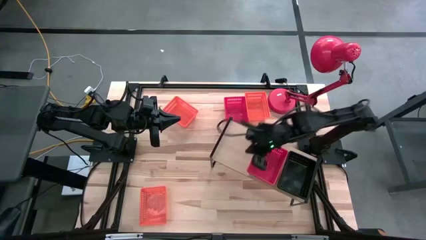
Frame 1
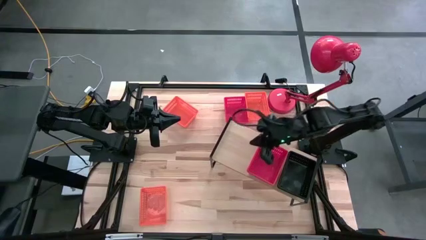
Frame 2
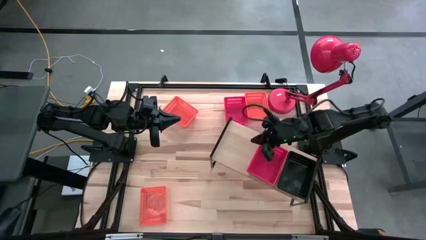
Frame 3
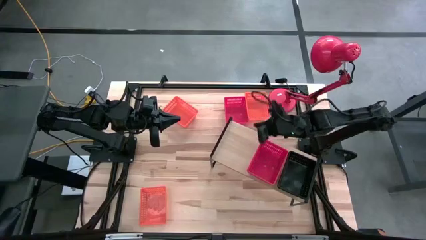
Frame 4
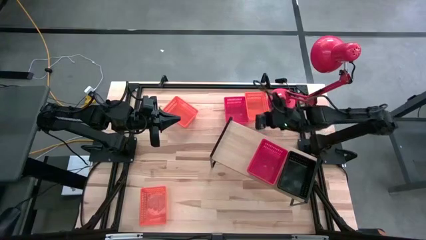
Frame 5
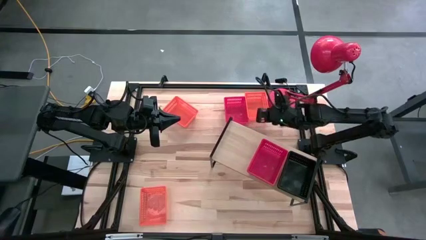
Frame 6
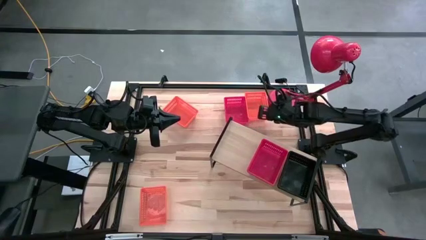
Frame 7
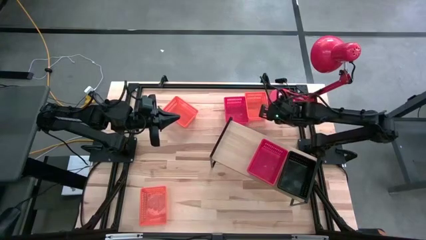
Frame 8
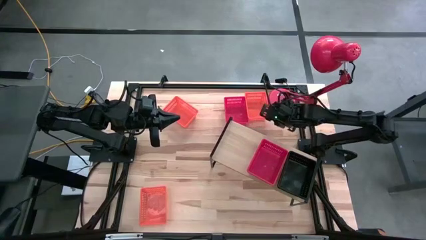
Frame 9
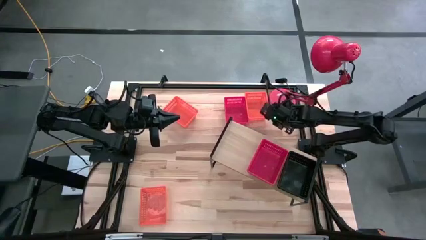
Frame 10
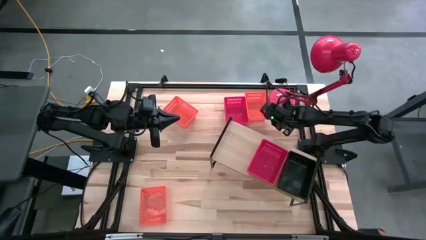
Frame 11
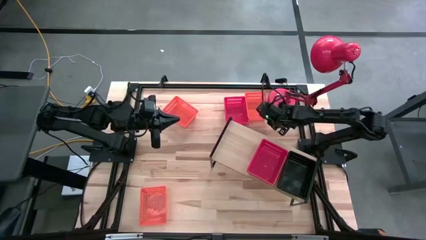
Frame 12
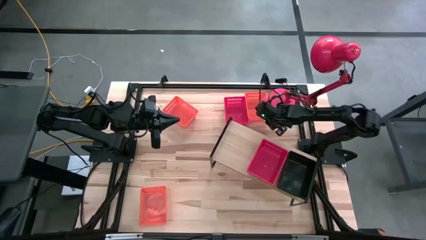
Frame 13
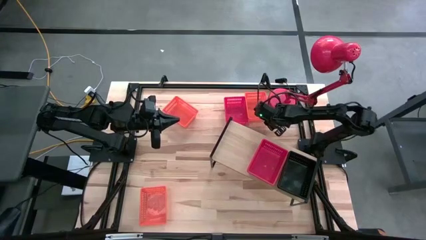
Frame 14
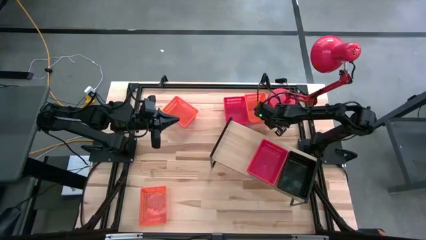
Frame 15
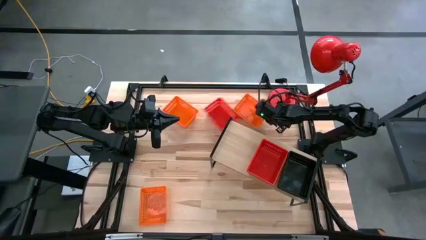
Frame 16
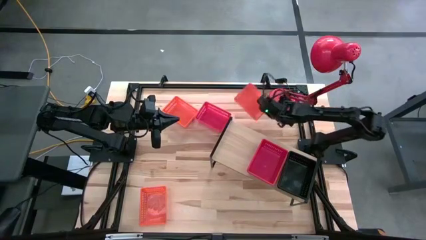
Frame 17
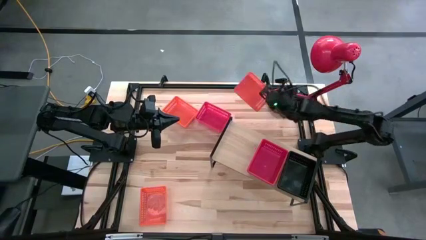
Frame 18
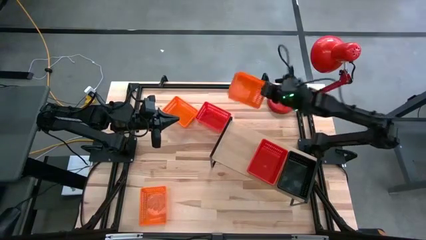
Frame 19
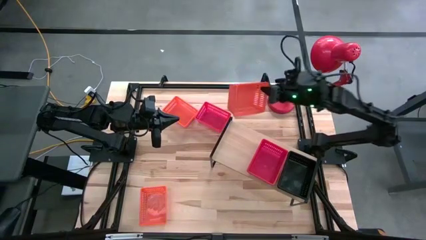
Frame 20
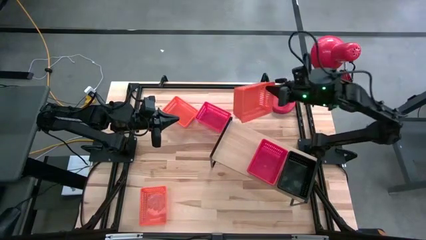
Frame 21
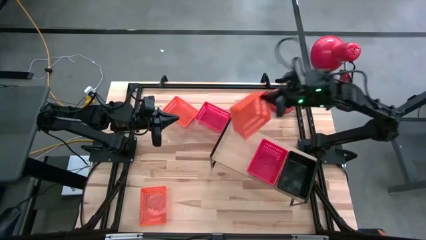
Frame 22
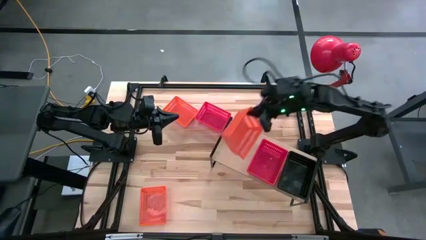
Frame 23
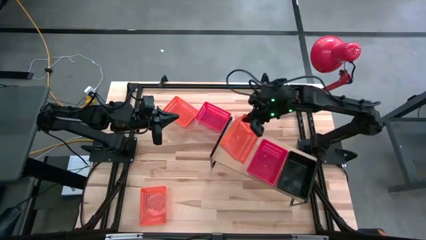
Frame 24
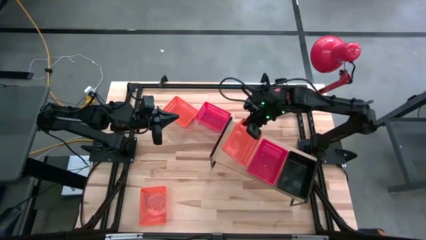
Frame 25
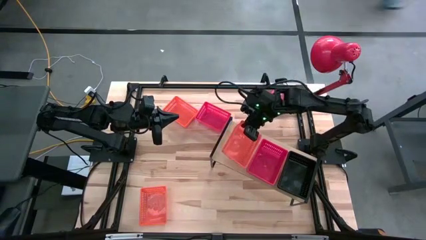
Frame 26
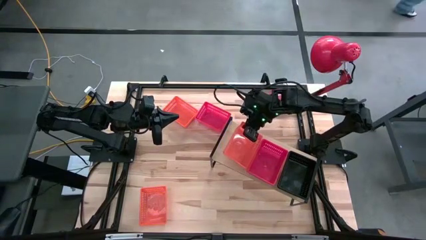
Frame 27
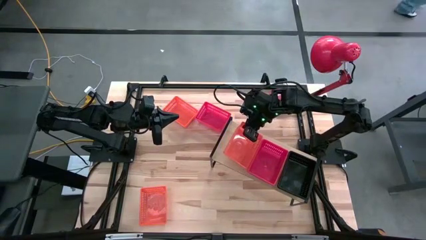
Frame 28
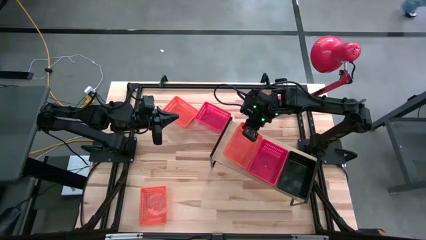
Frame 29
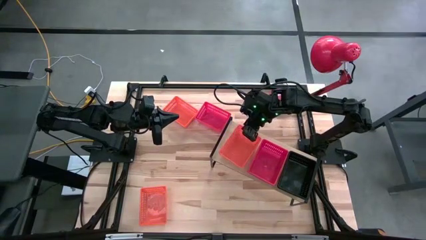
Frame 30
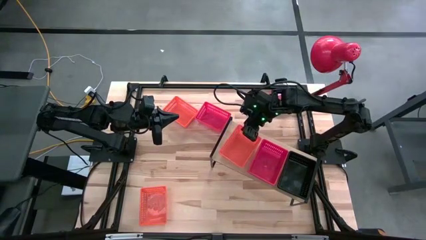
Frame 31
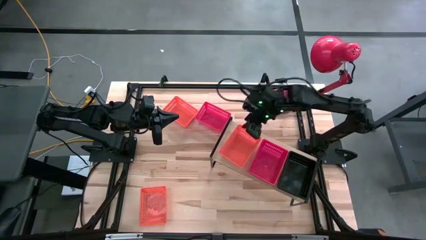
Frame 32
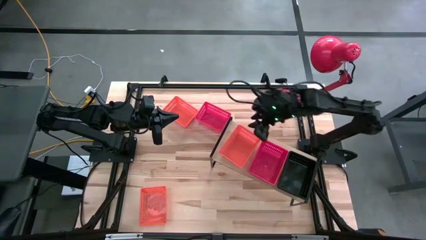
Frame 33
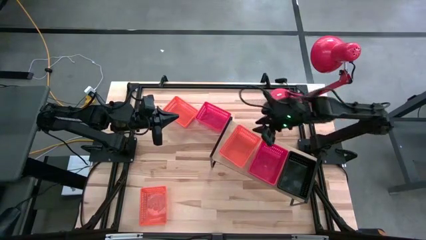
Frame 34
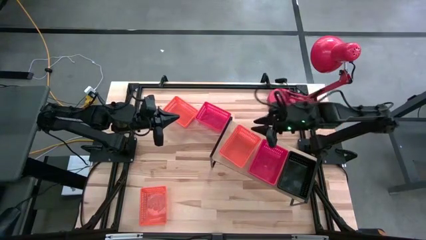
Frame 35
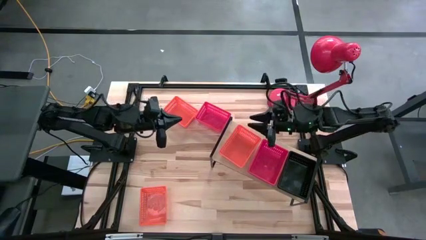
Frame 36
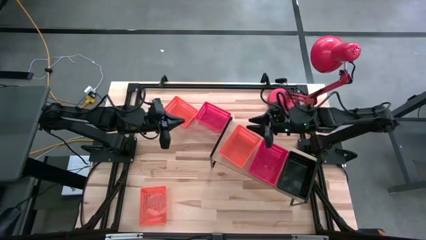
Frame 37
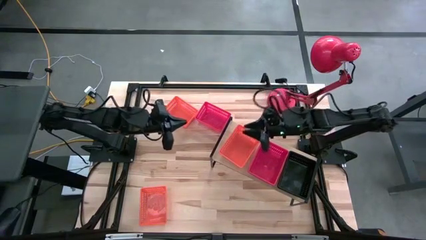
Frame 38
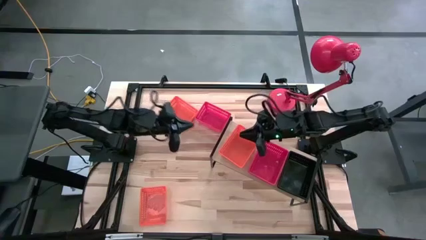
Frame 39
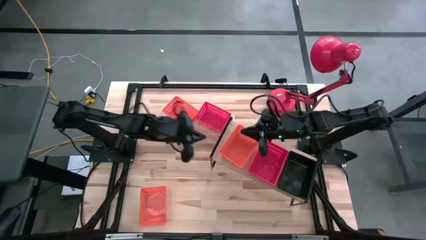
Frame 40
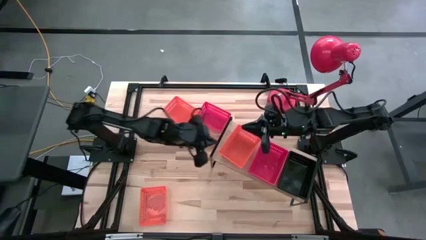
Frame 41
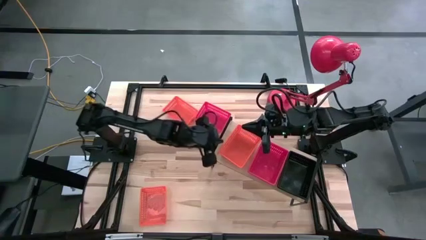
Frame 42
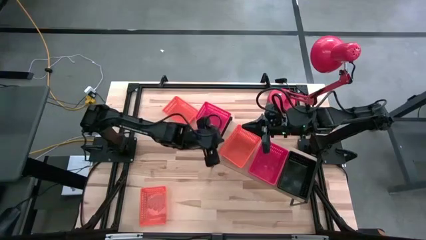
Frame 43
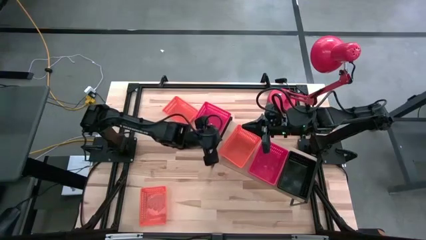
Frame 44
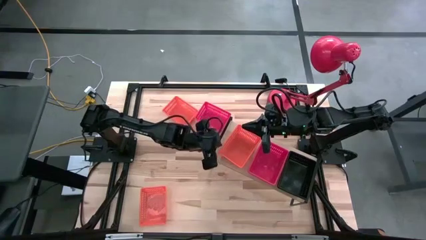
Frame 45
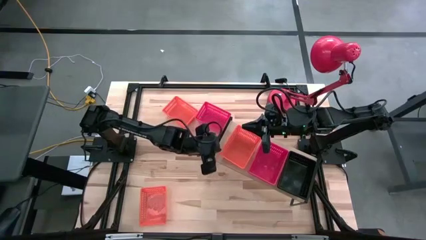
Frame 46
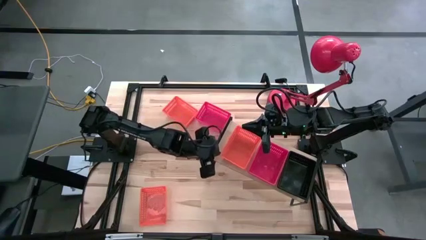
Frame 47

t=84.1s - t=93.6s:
Task: Stack baskets on shelf by color
Put the top right orange bin on the shelf

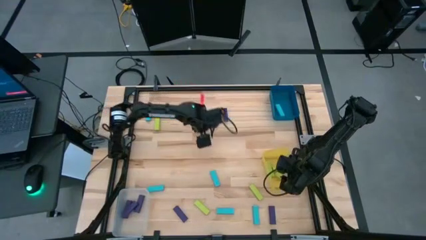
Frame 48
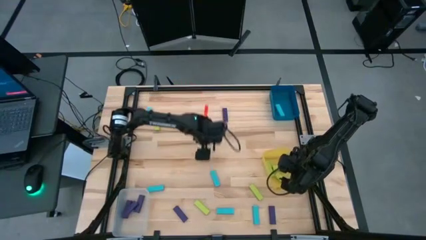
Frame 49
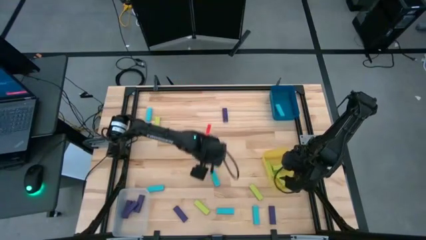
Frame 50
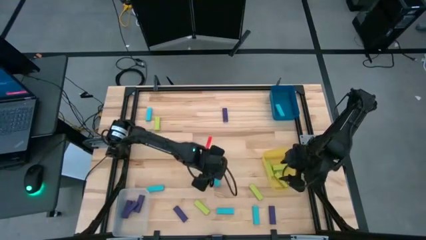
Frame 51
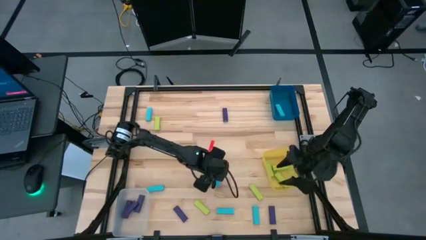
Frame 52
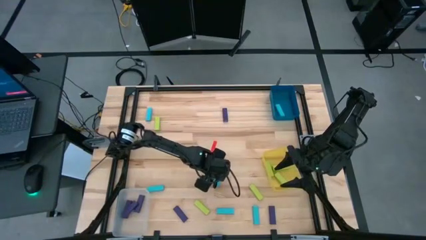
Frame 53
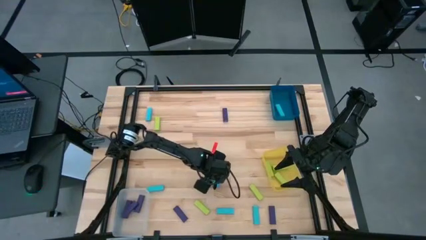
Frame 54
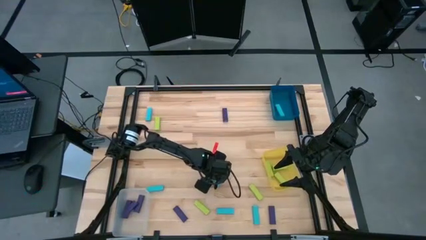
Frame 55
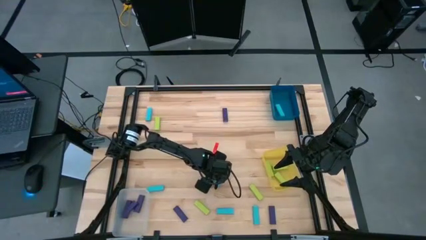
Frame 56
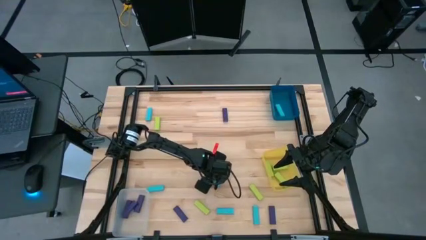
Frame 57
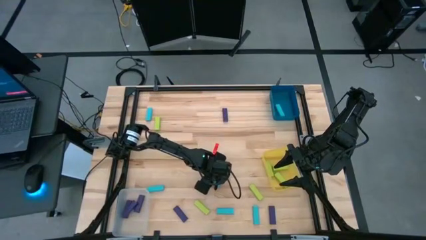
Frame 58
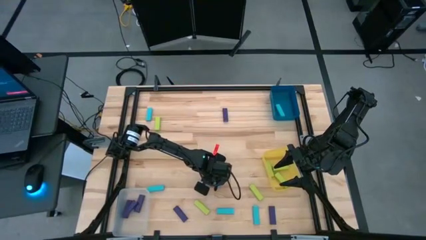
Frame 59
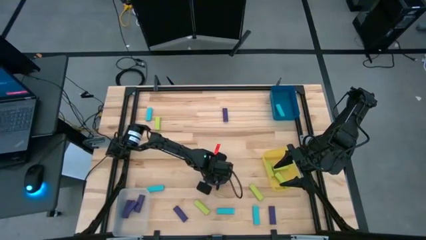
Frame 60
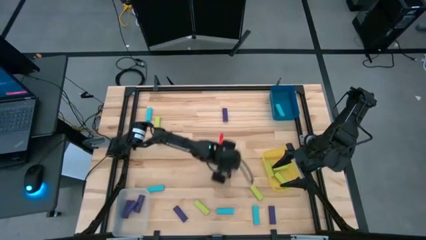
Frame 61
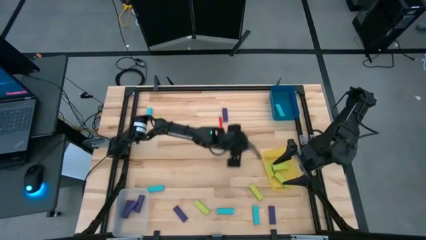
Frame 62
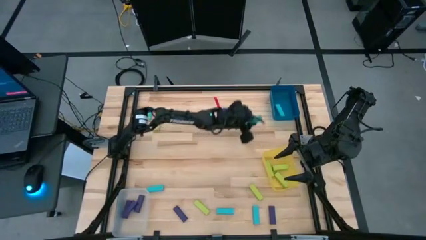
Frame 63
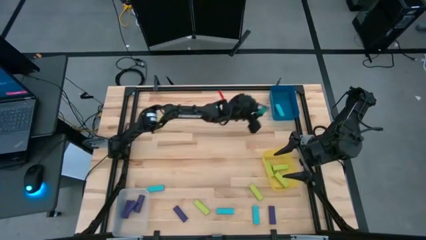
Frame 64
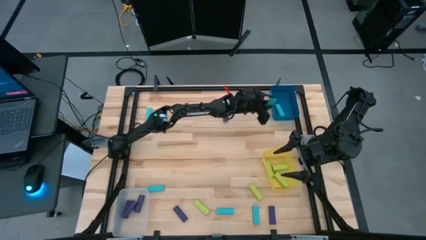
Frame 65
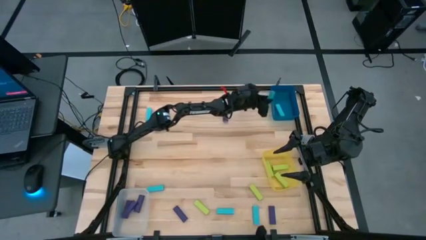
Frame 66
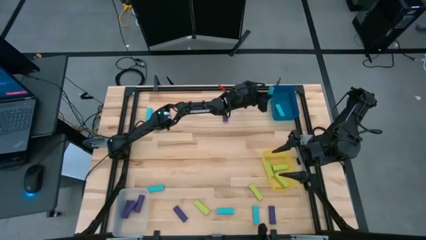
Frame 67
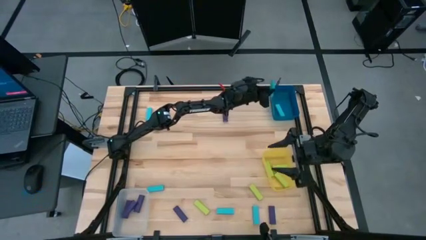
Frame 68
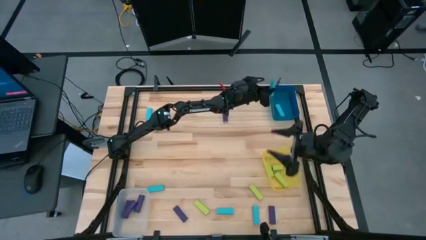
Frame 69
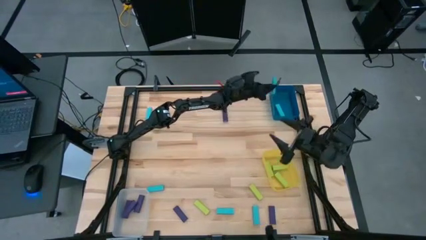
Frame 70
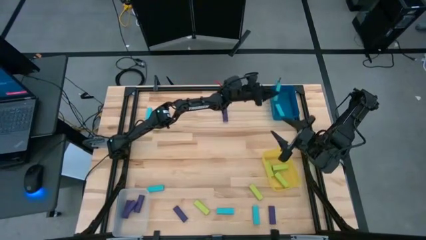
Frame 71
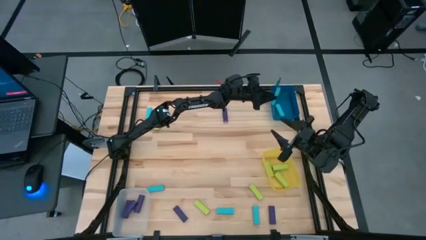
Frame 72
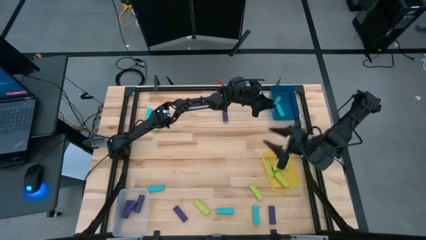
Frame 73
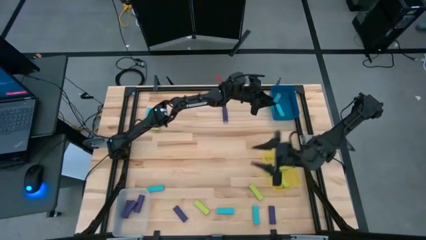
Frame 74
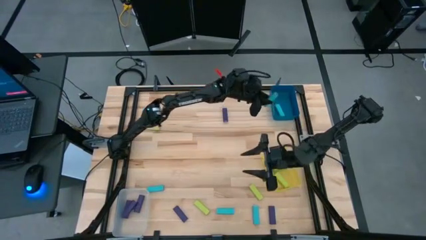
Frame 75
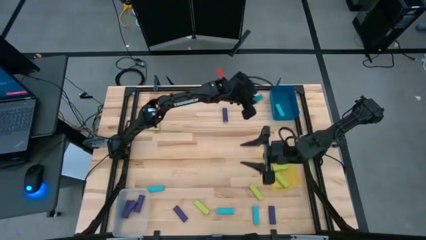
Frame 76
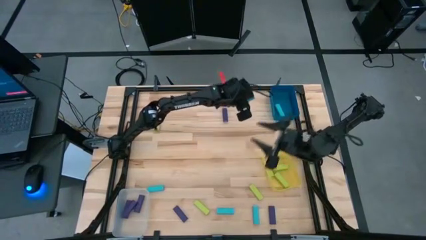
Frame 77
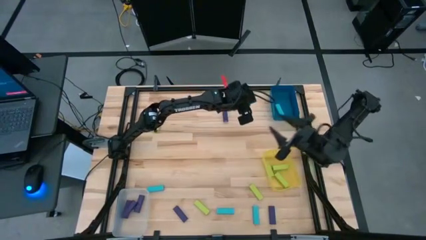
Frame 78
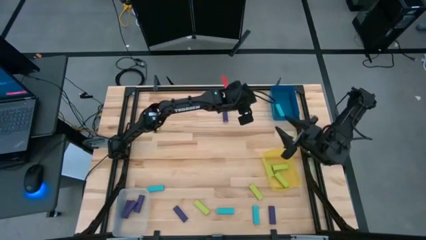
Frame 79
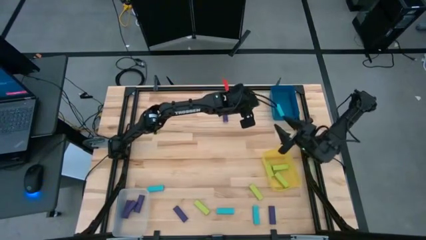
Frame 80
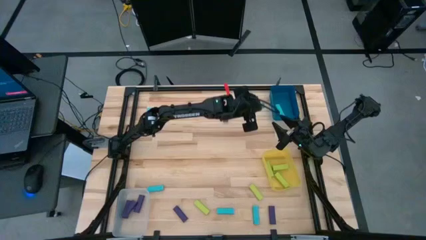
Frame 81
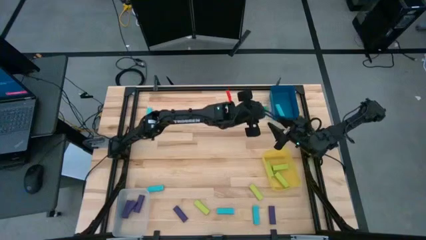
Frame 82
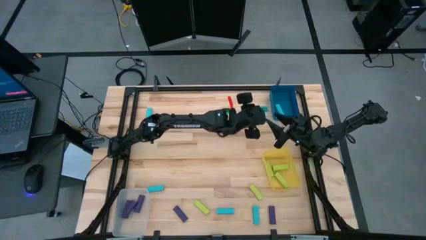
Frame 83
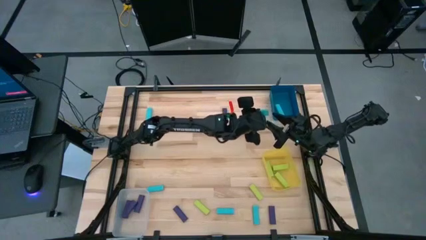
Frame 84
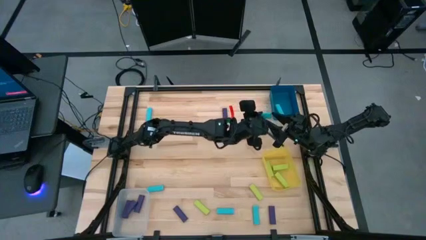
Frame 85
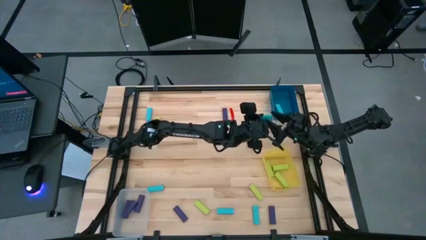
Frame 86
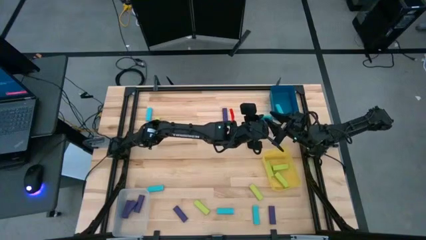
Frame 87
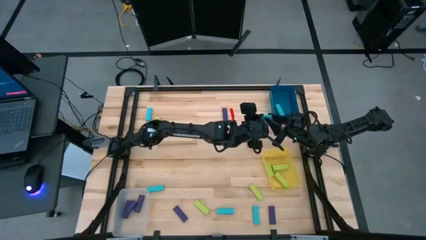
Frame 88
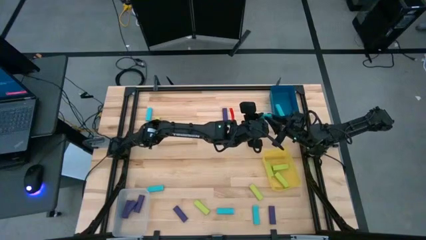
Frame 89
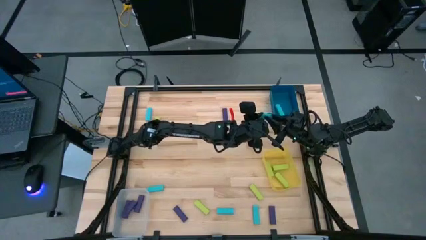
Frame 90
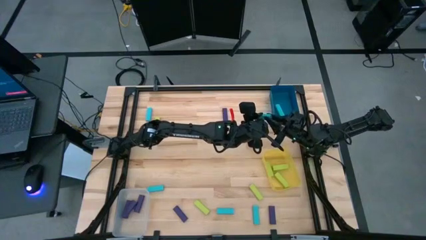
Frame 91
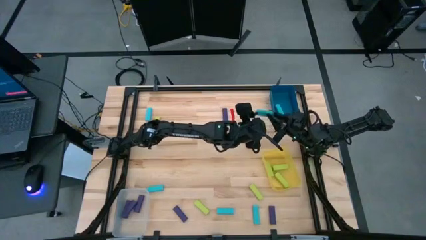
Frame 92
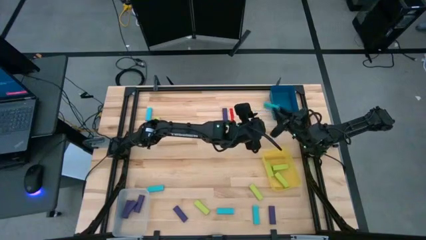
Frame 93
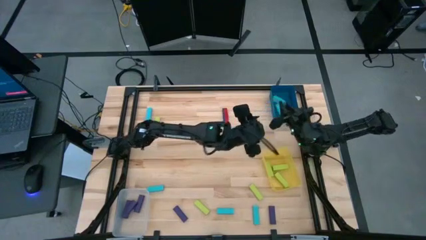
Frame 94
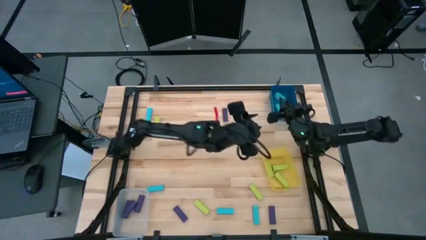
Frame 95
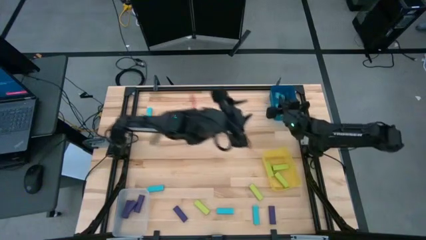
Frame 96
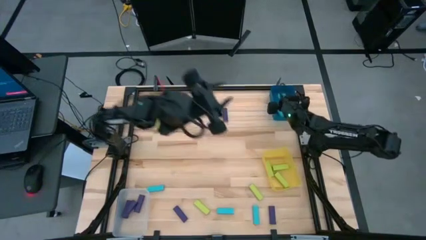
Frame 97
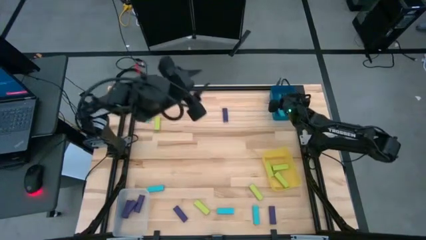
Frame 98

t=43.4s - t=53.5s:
Task: Sort blocks
Put the blue block into the blue bin
